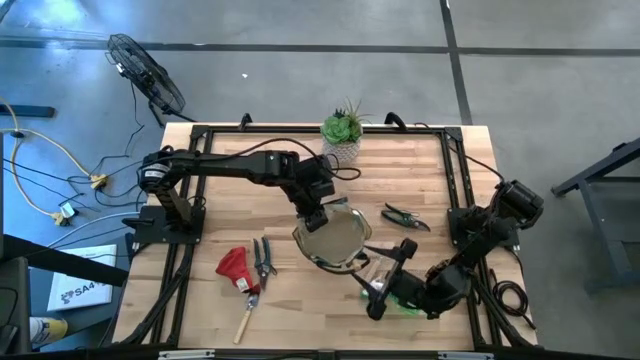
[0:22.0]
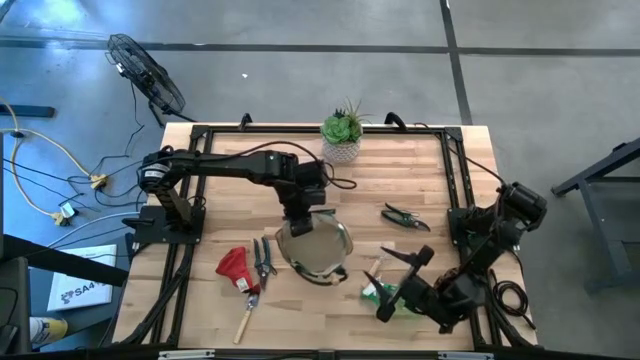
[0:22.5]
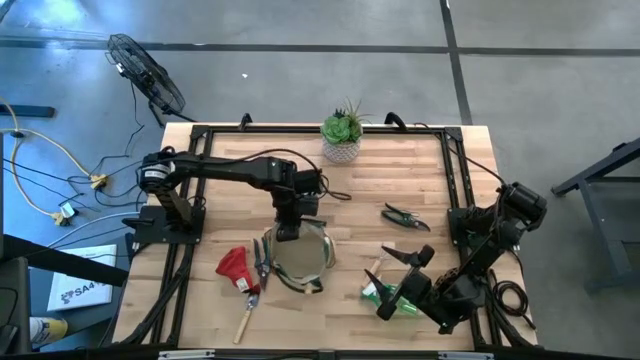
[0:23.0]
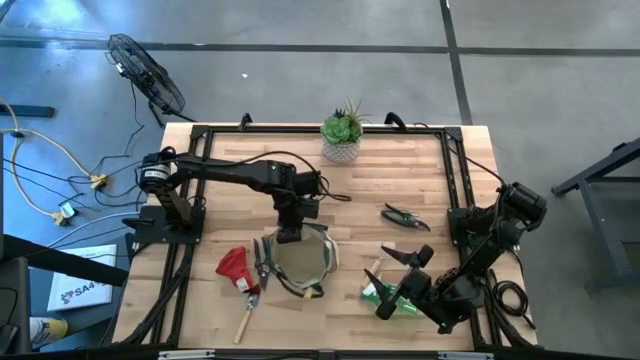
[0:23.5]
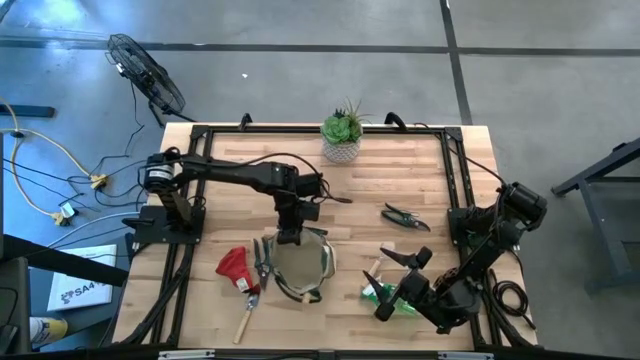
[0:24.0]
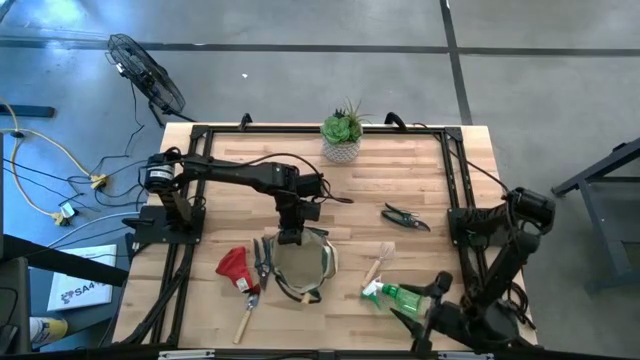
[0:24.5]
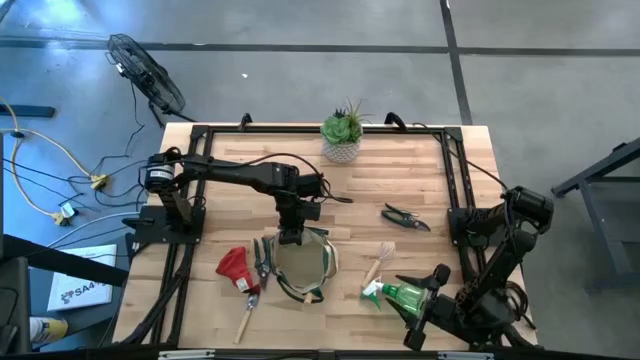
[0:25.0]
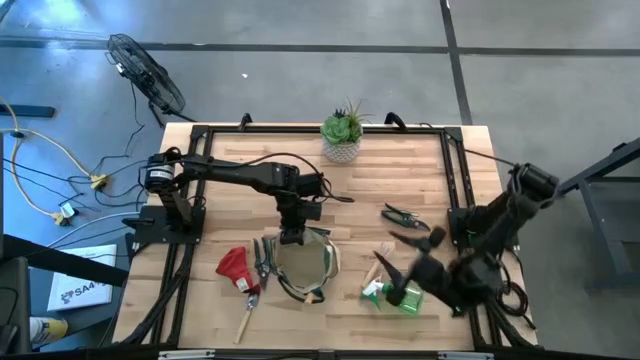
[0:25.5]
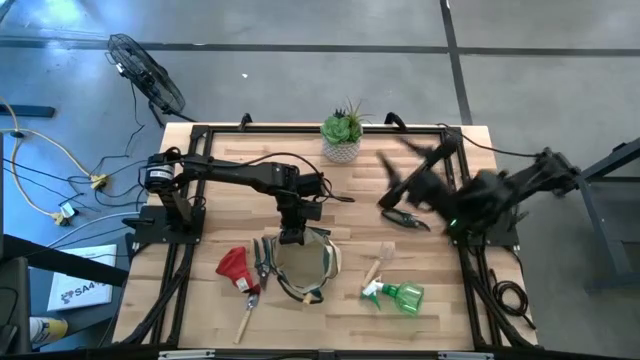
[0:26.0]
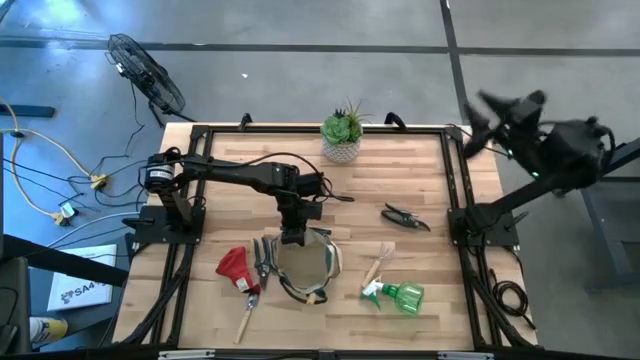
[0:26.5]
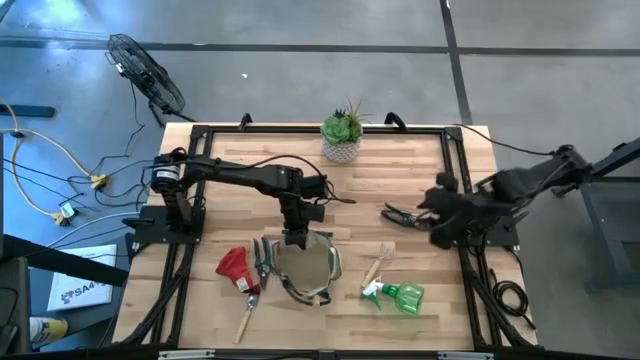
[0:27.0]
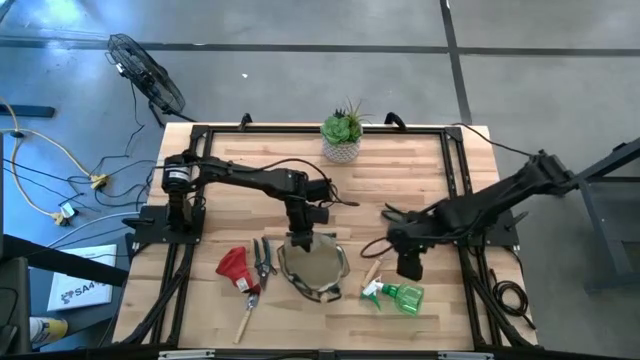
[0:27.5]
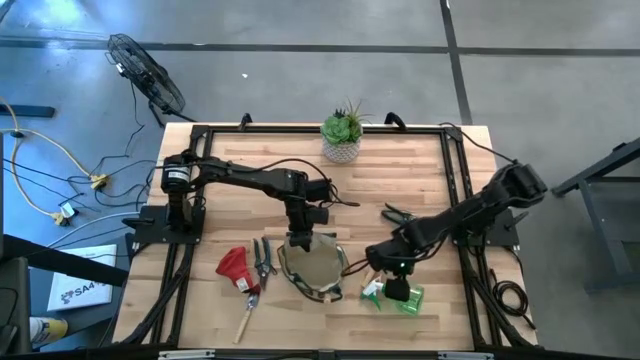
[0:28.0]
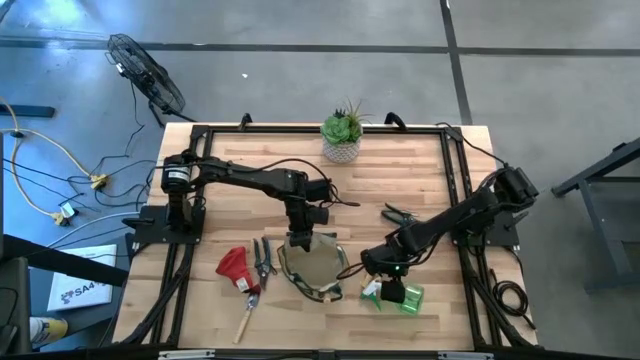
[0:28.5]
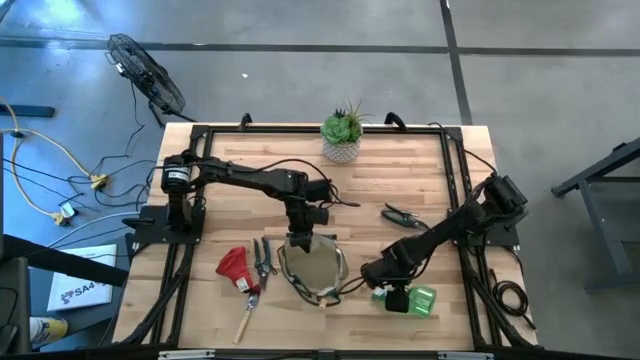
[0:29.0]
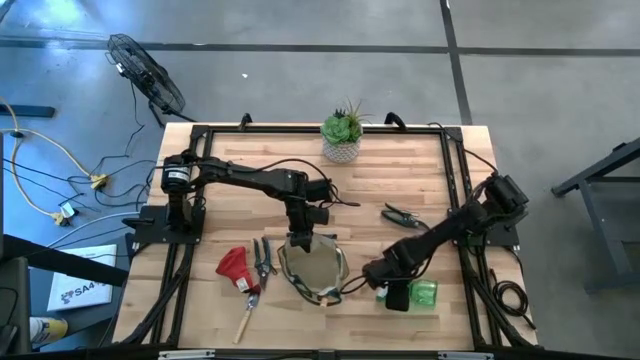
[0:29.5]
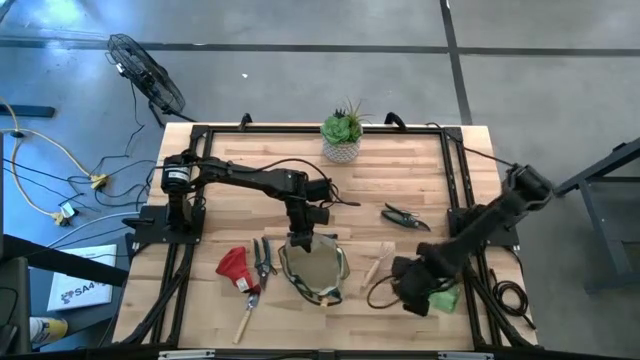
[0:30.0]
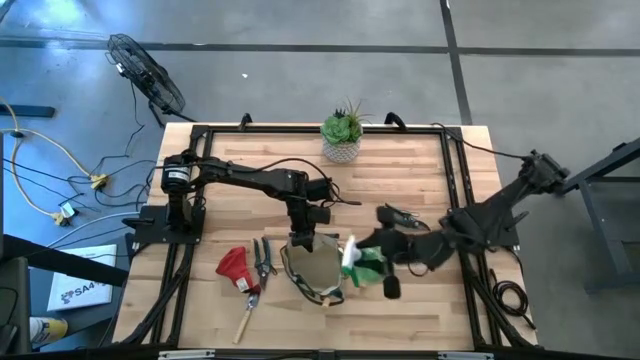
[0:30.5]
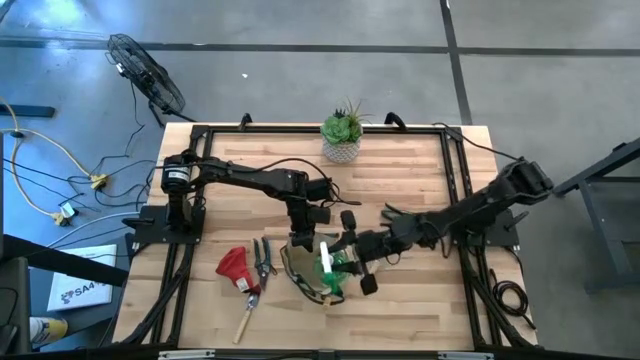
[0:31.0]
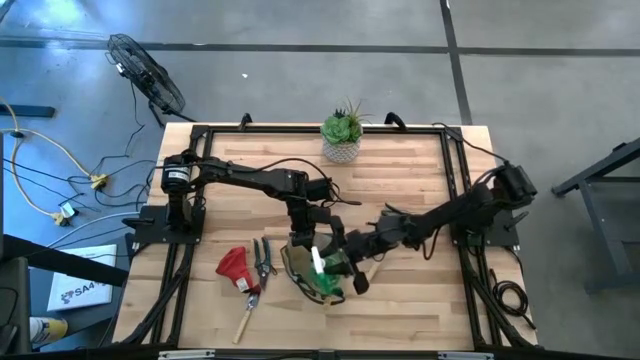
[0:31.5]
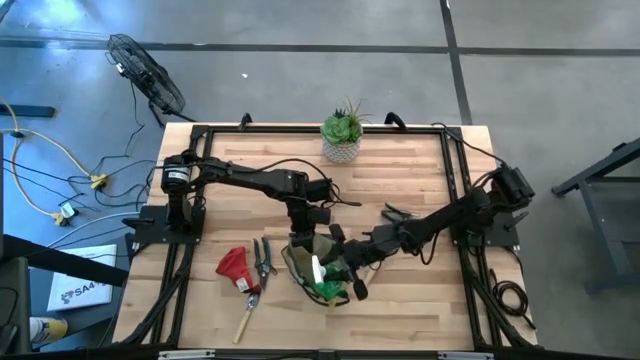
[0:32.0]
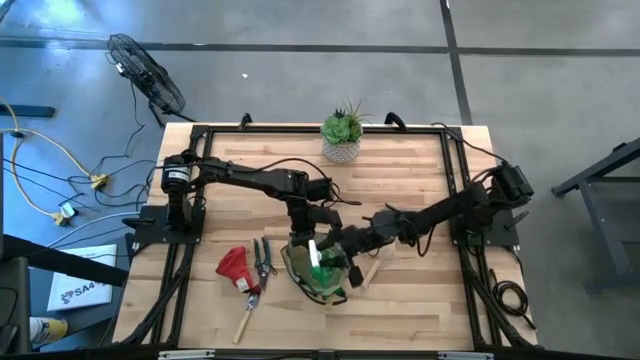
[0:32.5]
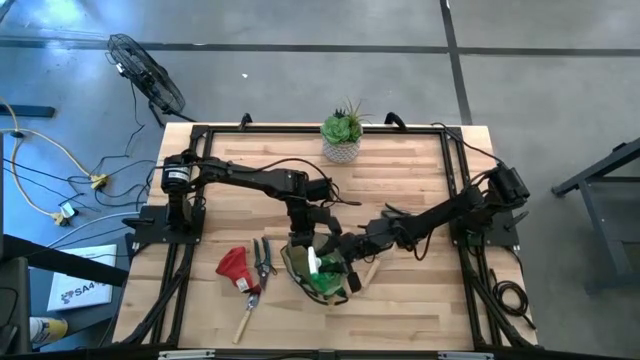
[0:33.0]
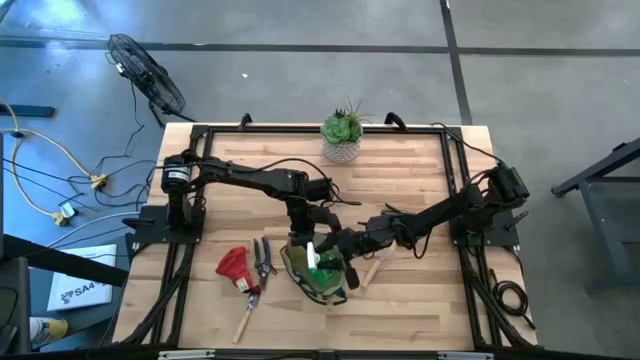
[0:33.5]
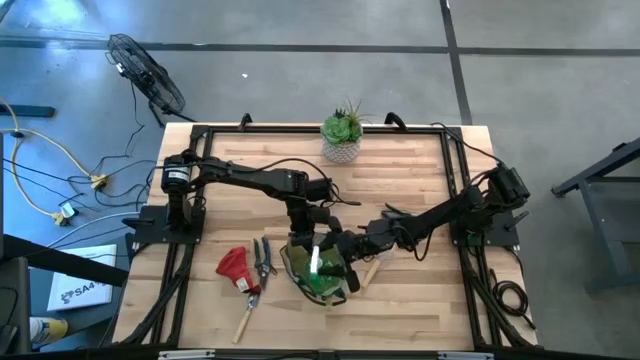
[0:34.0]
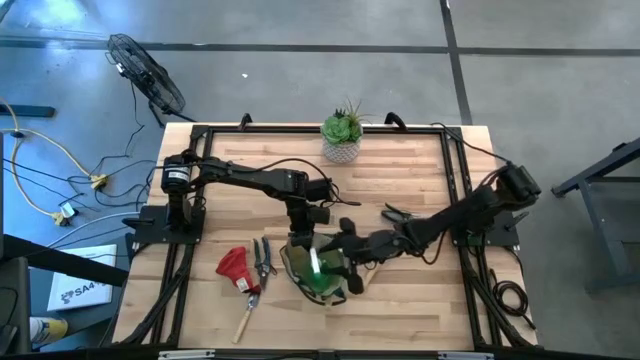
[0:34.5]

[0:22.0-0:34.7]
Task: Pick & Place Garden tools in Gardening bag
Put the green spray bottle into the gardening bag

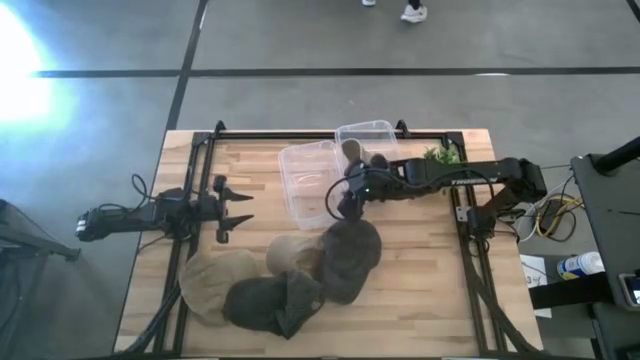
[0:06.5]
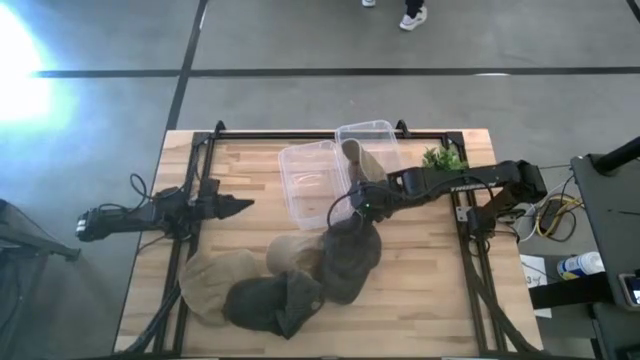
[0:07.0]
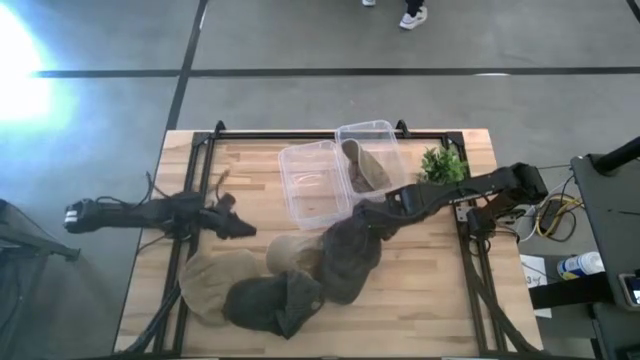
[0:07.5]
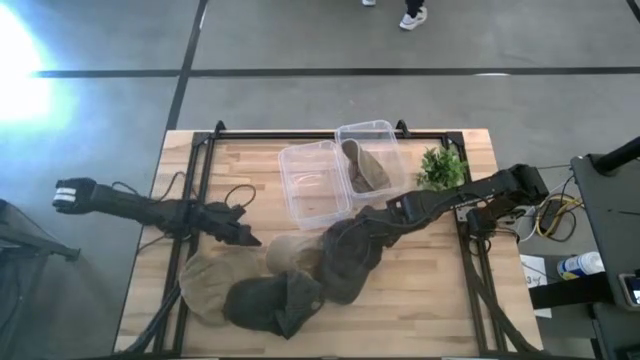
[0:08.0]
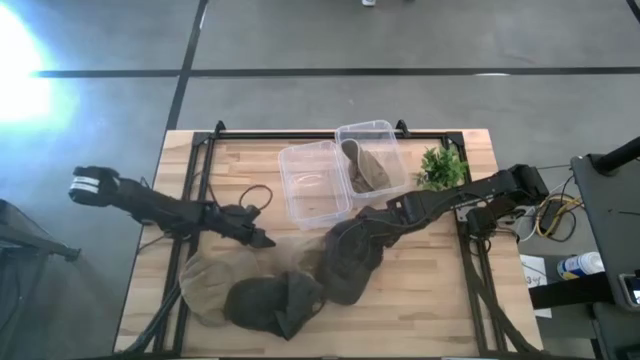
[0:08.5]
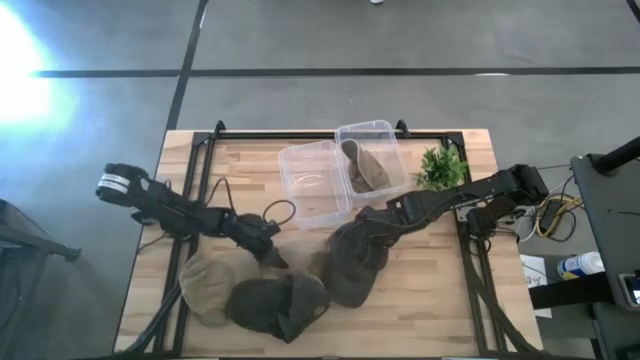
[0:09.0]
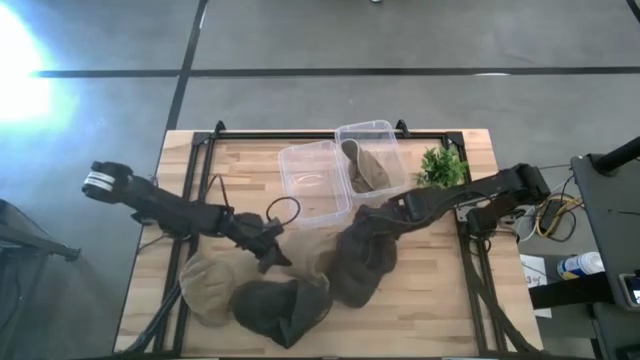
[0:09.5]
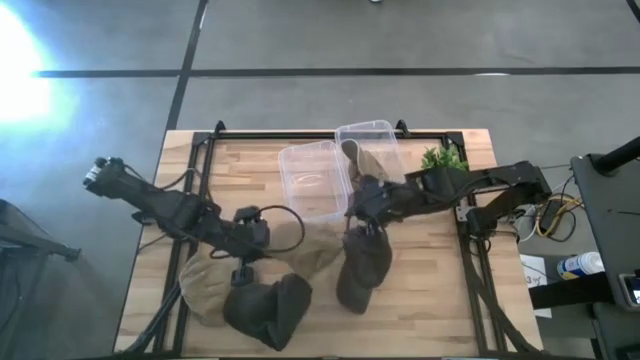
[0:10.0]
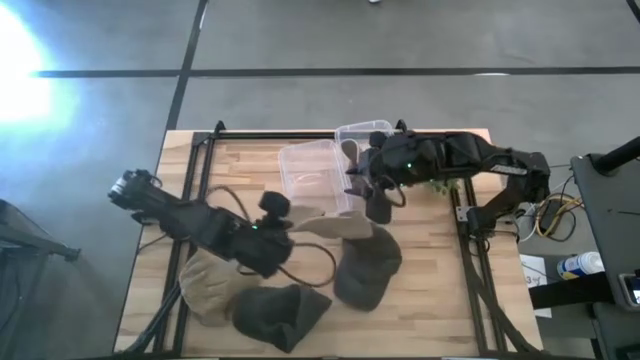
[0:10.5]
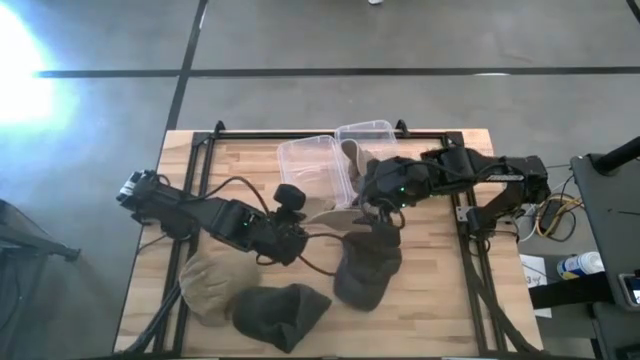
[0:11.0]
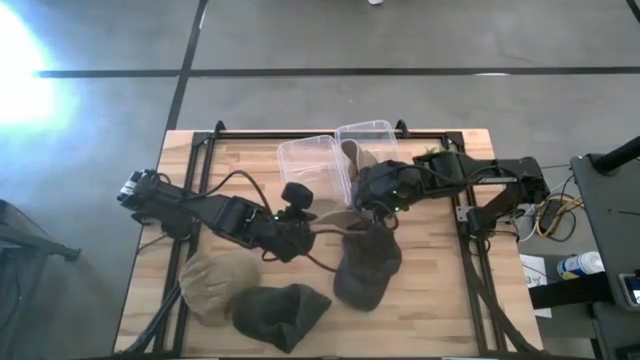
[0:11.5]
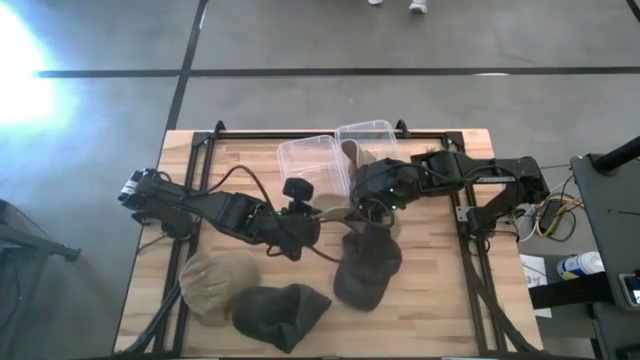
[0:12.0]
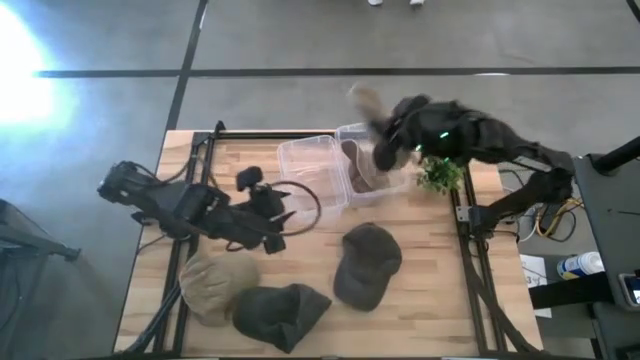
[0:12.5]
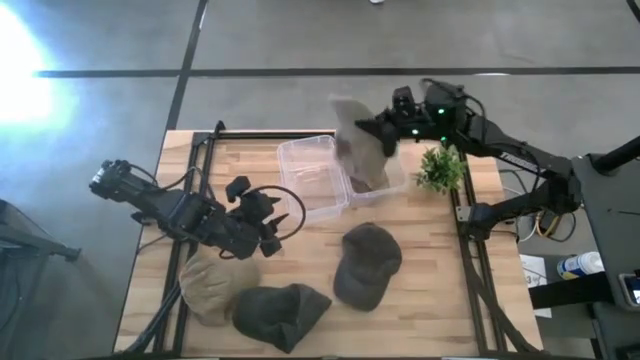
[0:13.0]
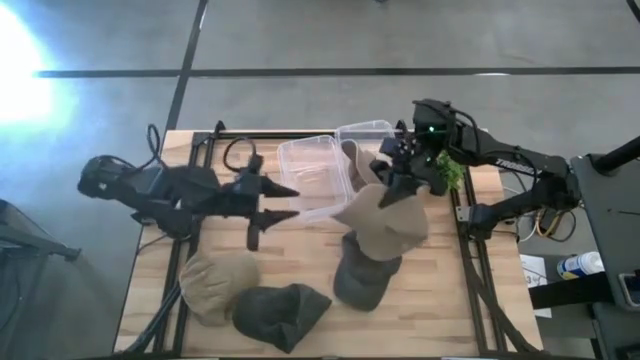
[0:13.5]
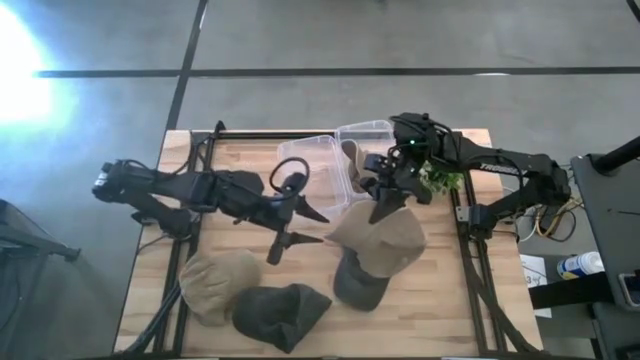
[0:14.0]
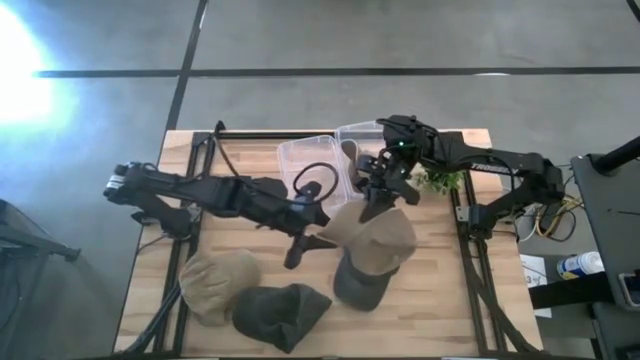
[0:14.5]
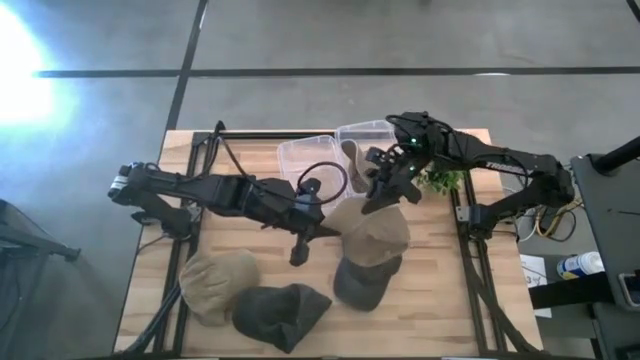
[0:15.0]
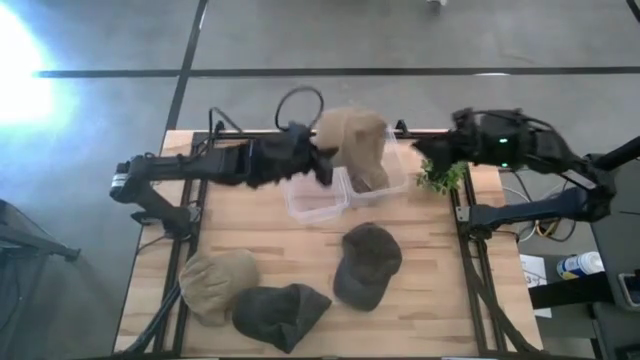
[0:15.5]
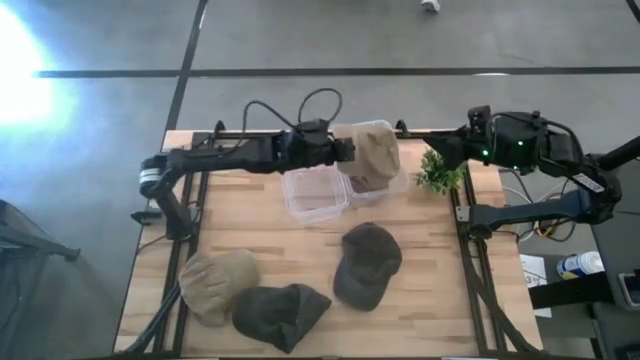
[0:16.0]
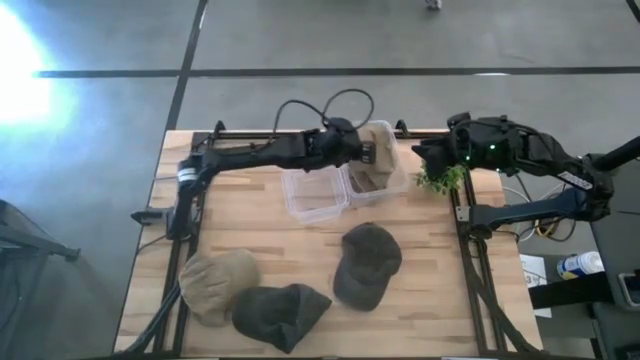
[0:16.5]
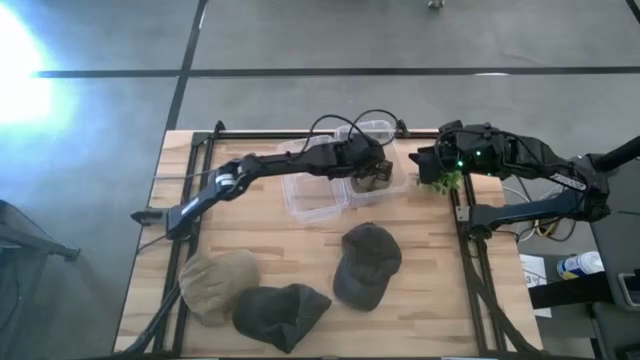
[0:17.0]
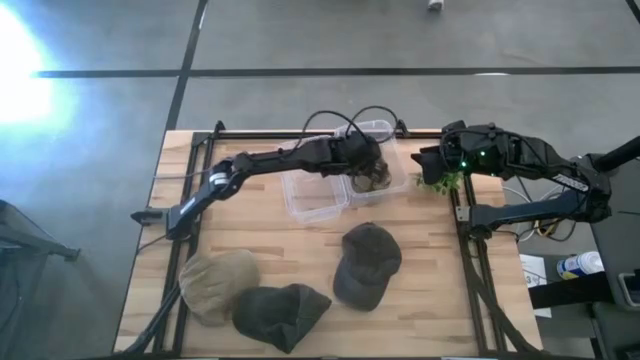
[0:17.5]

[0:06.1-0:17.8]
Task: Pick & Place hat
Put the right brown cap into the right transparent bin
